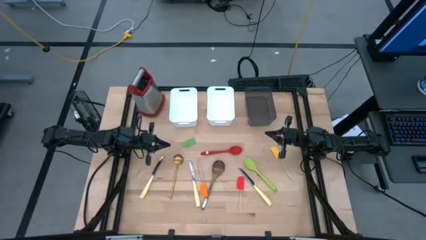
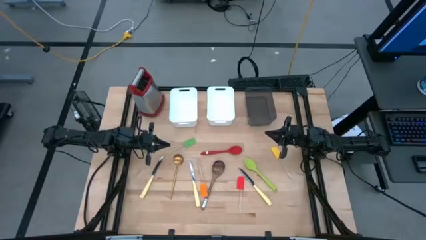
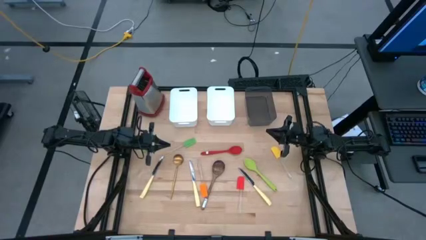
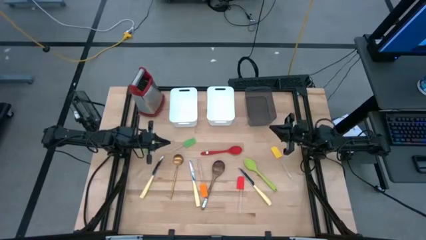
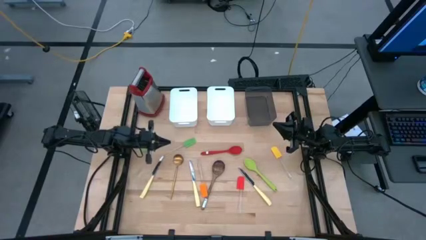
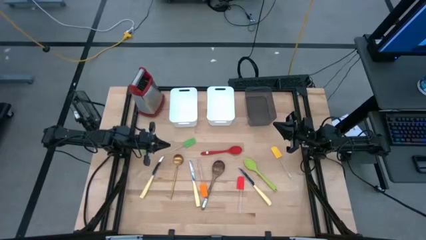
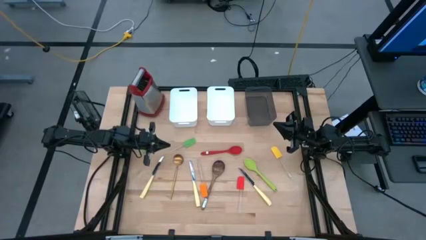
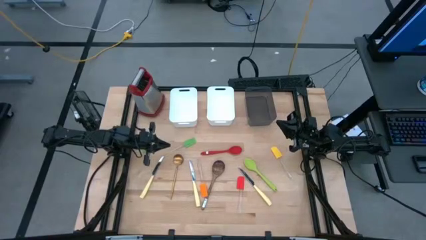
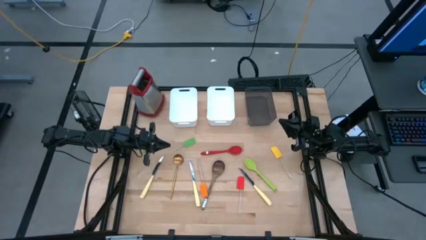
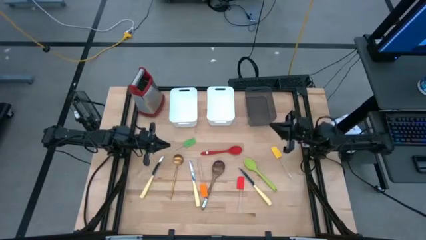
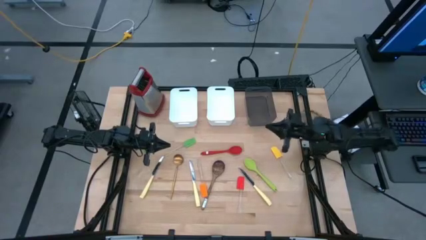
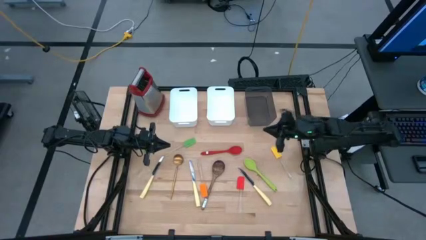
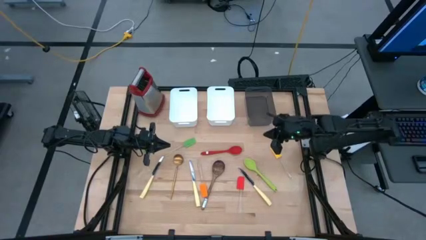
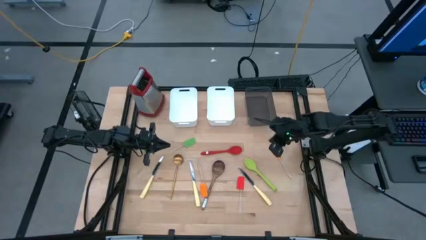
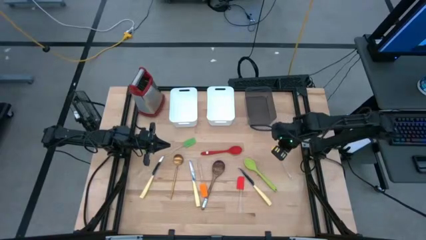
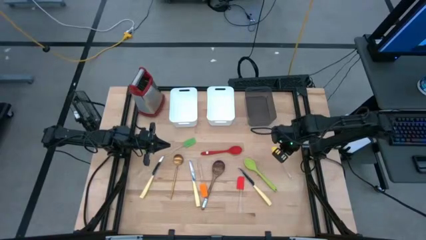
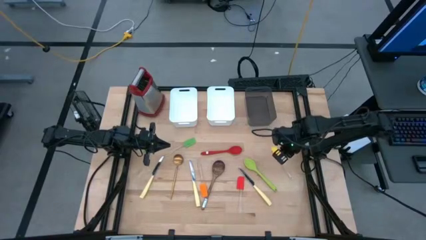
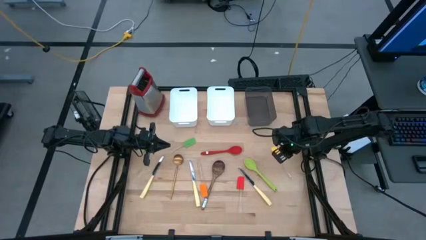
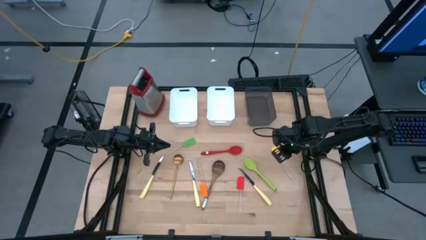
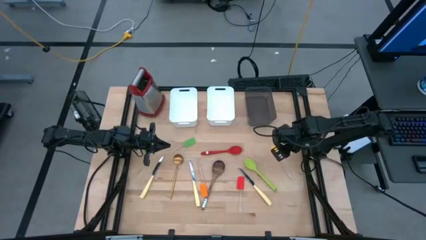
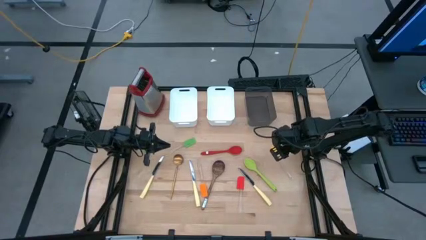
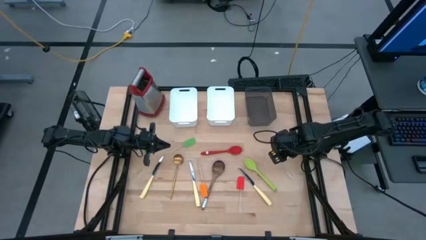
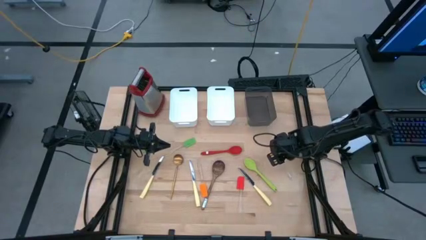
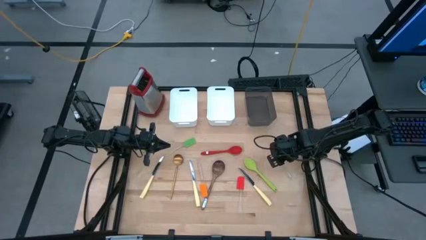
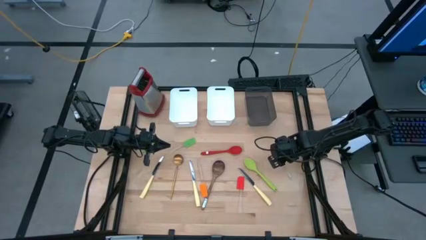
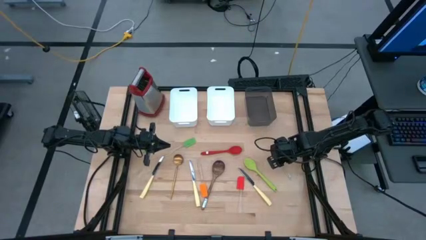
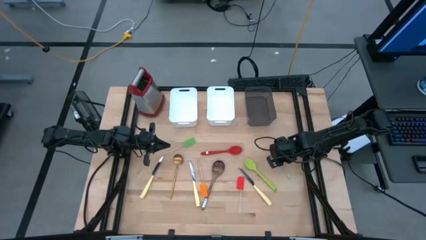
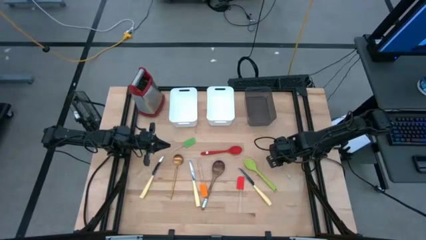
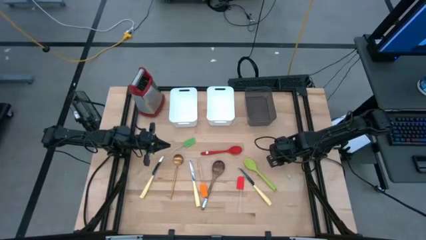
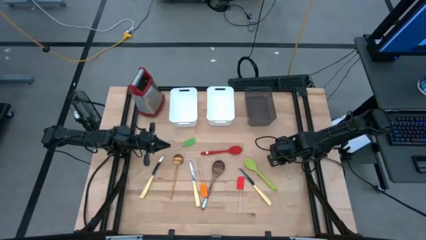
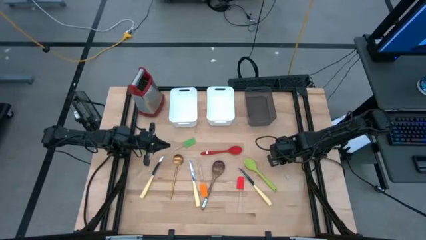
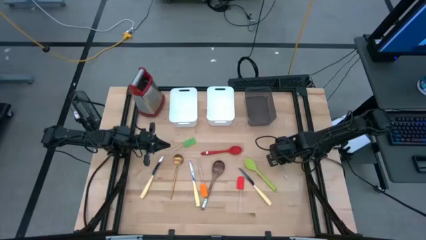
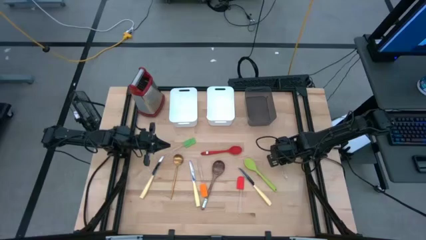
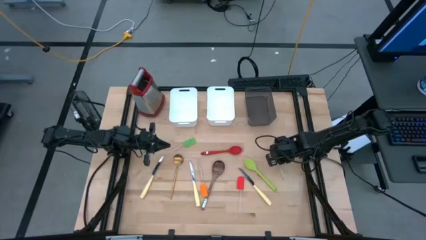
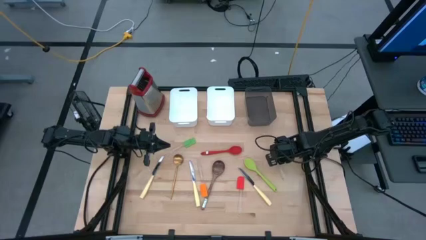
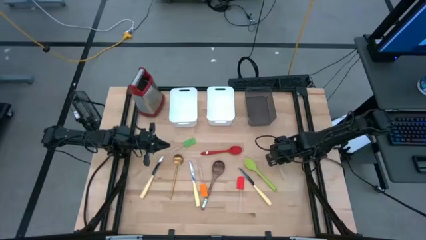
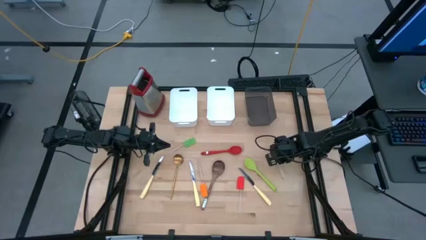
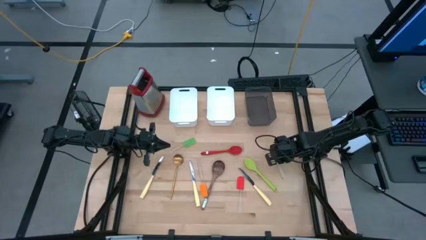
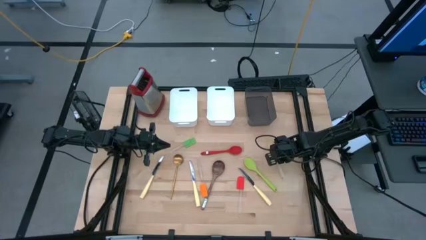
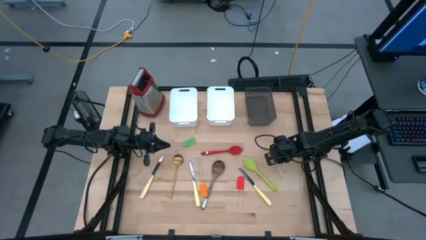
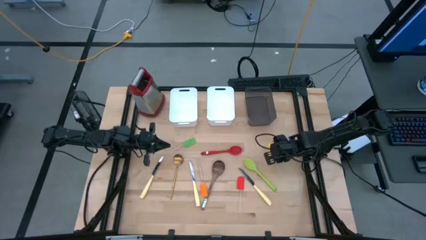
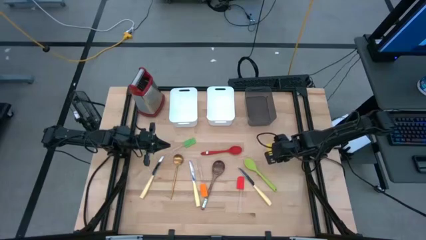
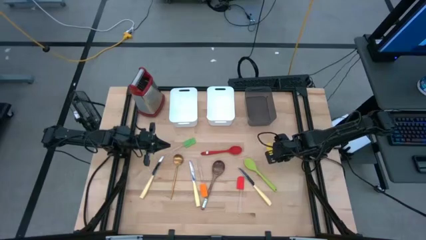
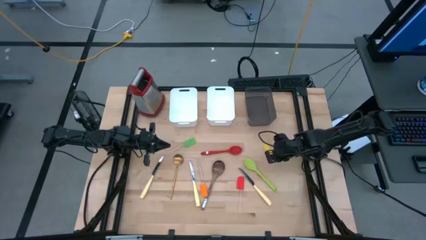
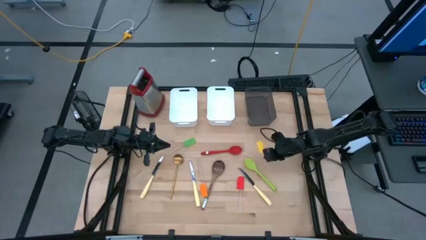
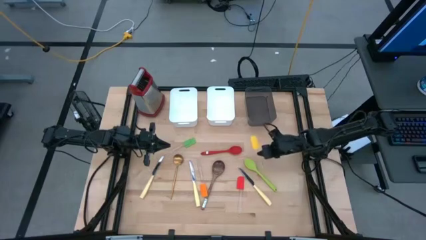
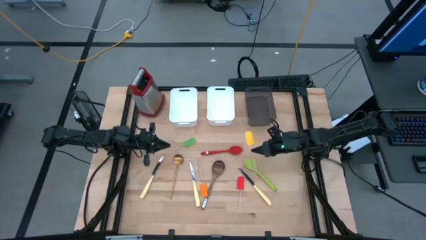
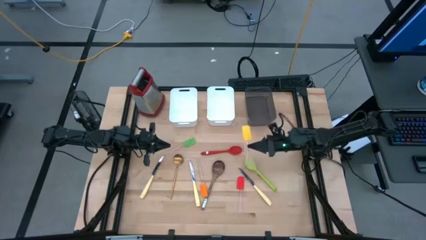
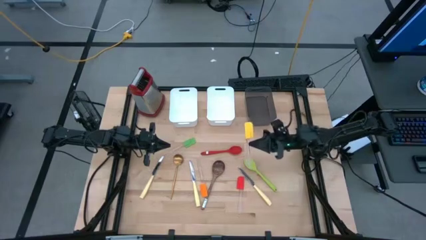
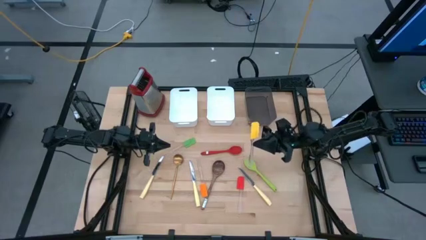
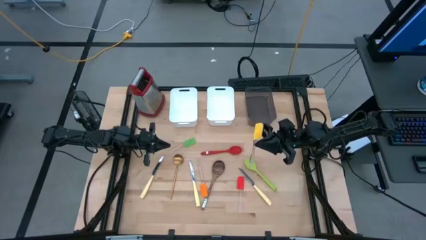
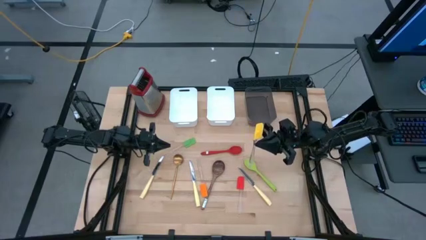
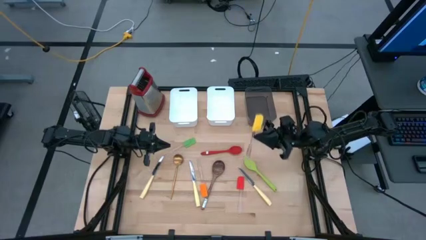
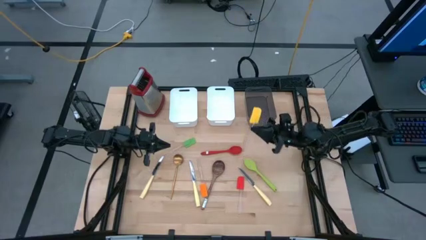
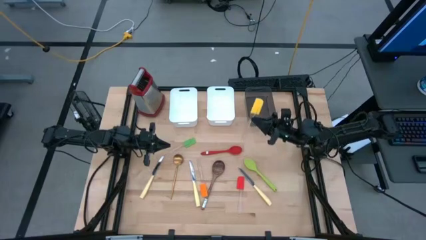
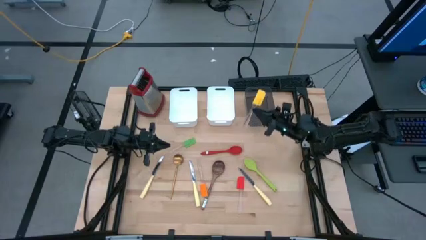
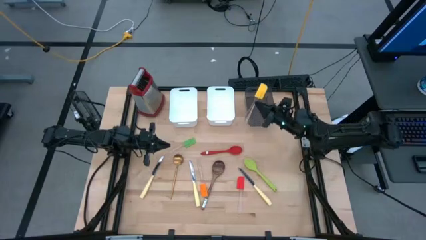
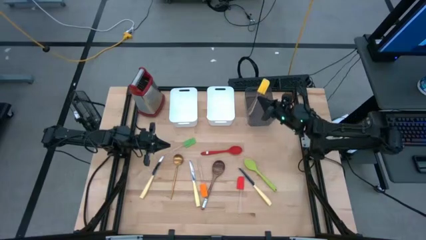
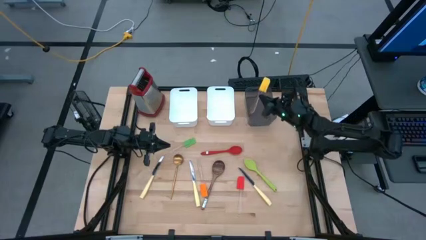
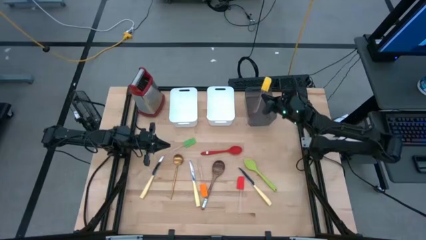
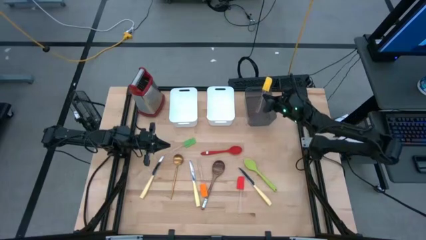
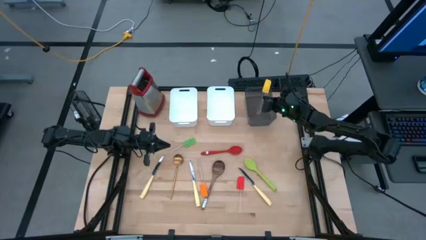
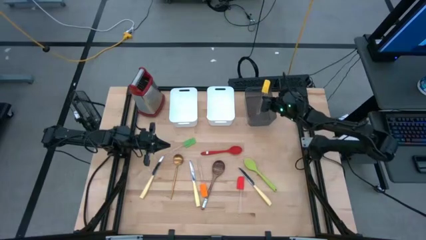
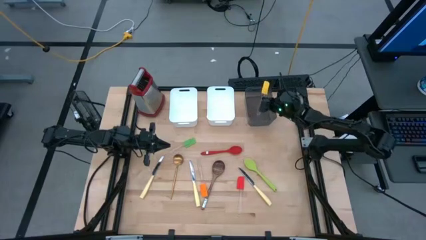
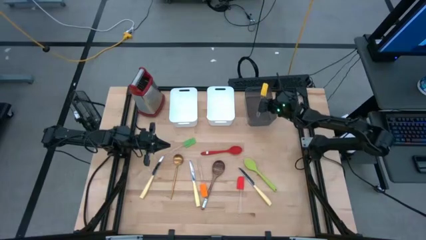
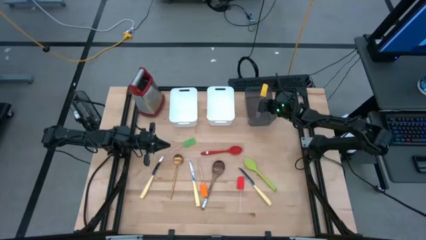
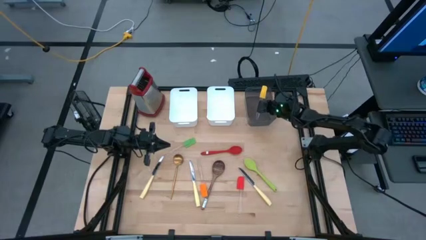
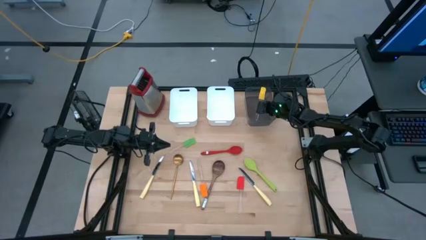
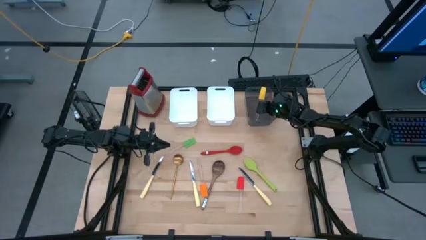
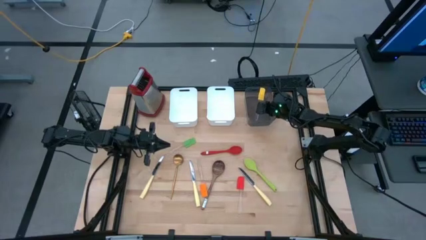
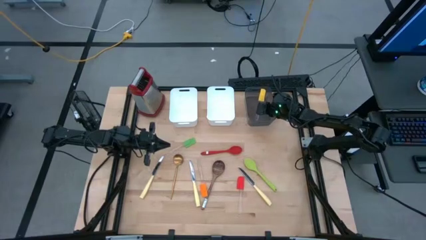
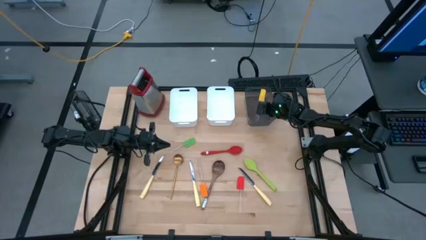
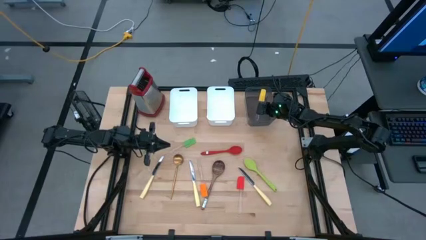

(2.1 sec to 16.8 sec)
Task: Pick & Place Kitchen Items
Put the yellow silicone spatula into the black bin
